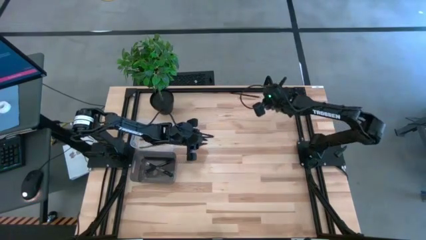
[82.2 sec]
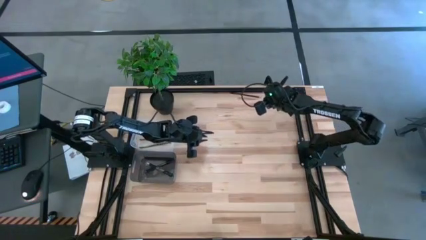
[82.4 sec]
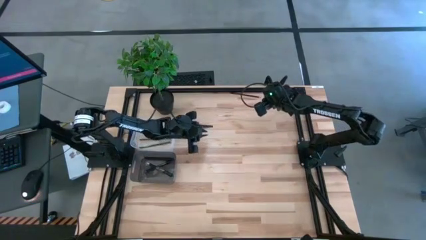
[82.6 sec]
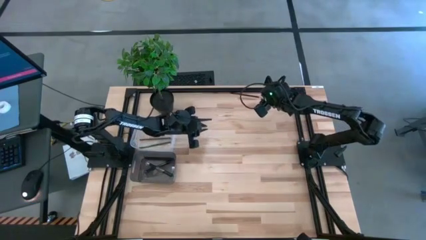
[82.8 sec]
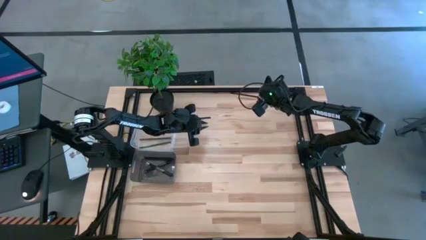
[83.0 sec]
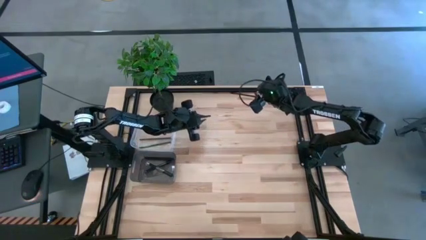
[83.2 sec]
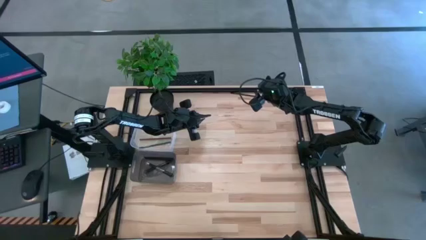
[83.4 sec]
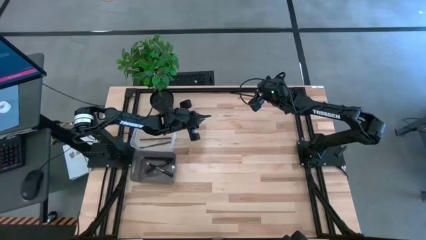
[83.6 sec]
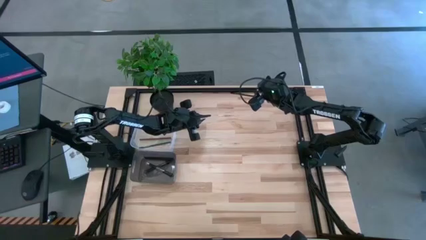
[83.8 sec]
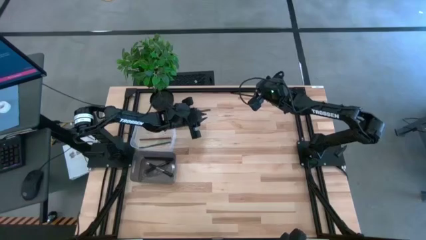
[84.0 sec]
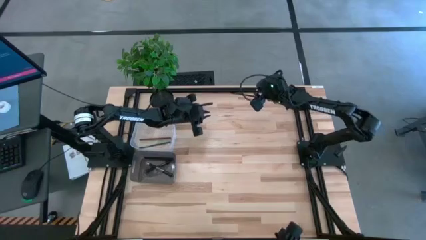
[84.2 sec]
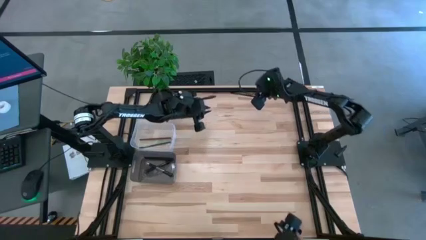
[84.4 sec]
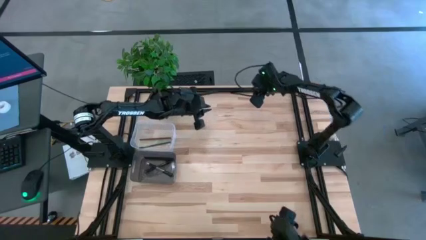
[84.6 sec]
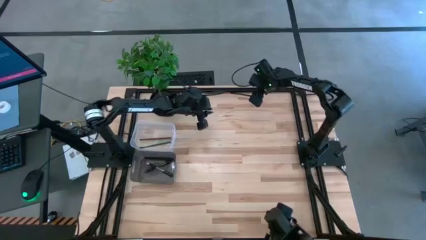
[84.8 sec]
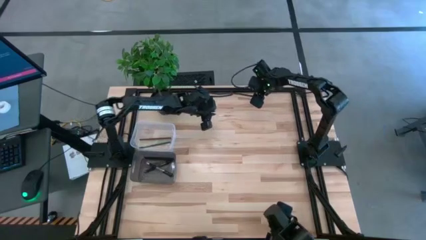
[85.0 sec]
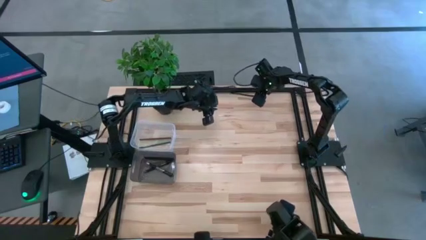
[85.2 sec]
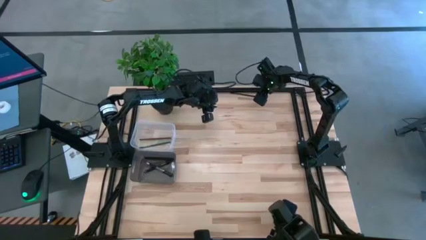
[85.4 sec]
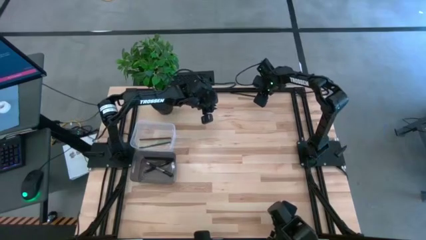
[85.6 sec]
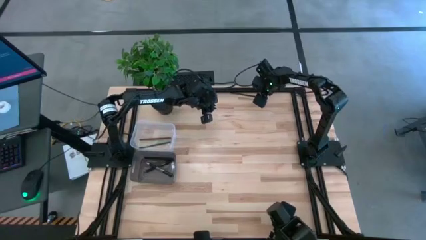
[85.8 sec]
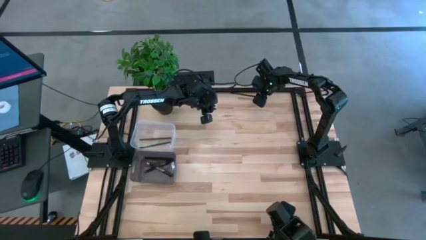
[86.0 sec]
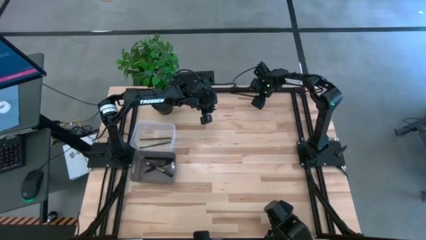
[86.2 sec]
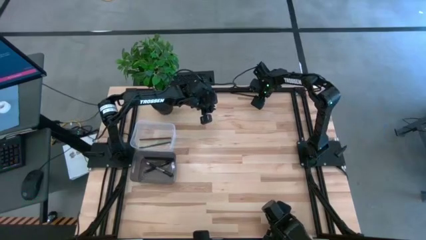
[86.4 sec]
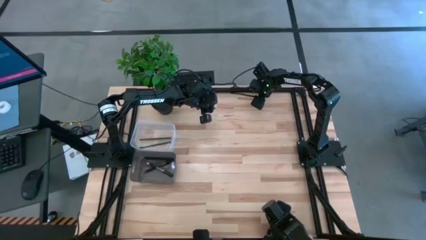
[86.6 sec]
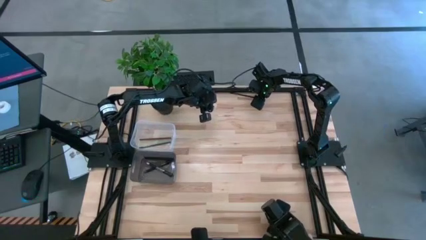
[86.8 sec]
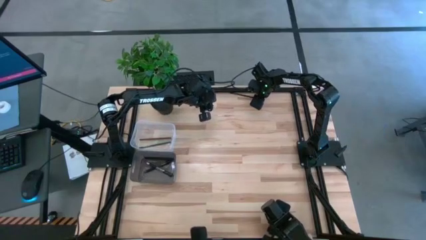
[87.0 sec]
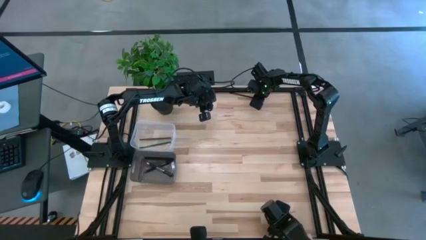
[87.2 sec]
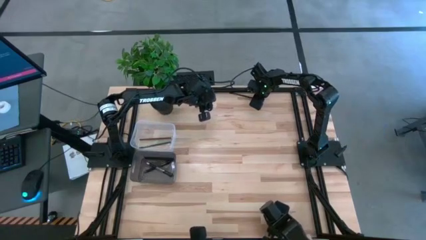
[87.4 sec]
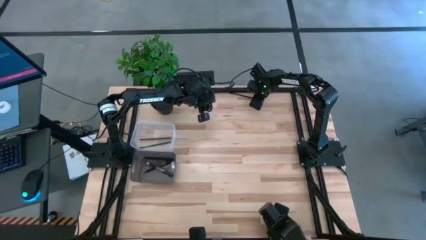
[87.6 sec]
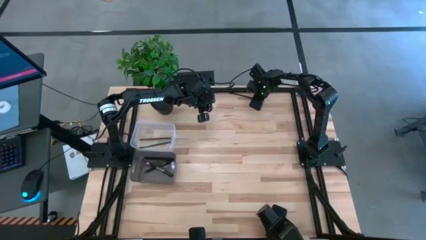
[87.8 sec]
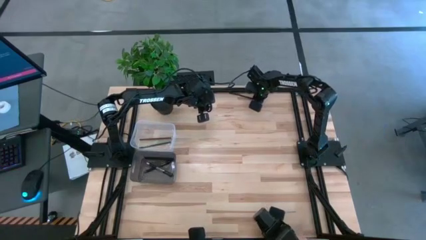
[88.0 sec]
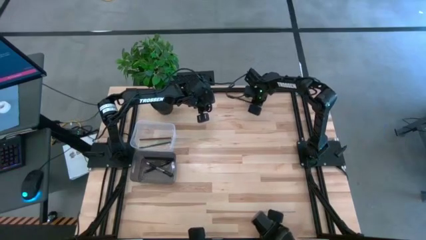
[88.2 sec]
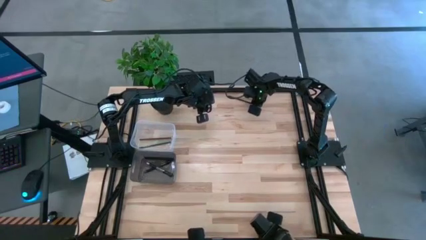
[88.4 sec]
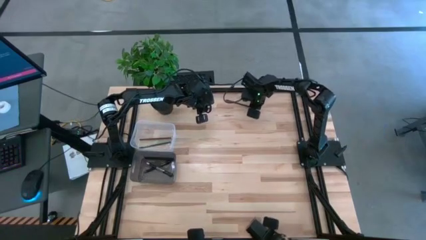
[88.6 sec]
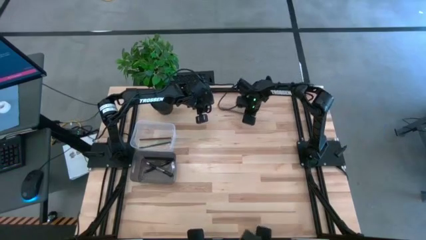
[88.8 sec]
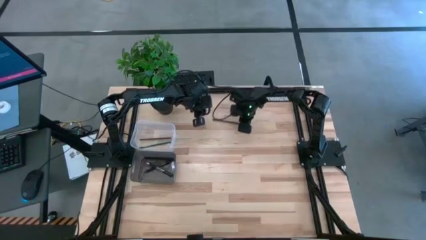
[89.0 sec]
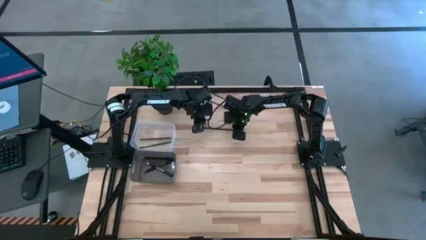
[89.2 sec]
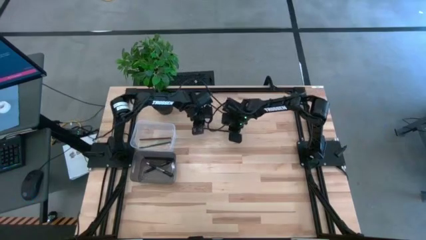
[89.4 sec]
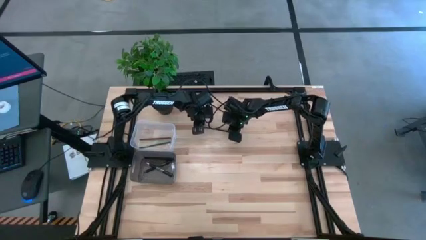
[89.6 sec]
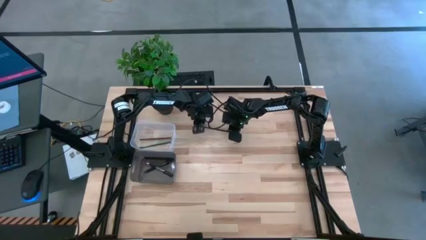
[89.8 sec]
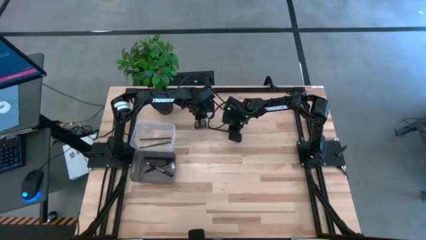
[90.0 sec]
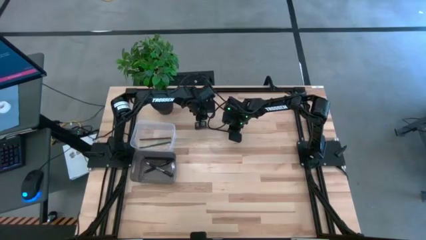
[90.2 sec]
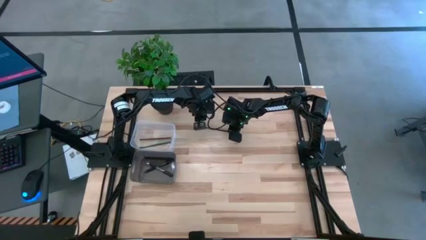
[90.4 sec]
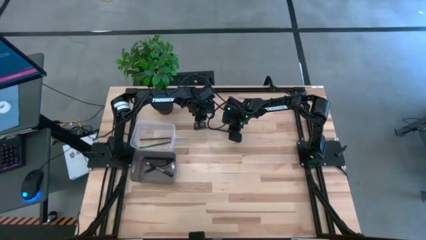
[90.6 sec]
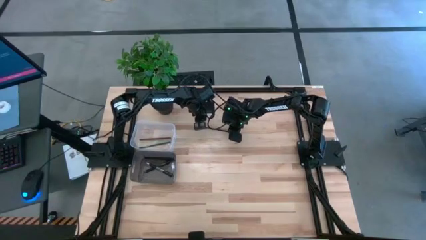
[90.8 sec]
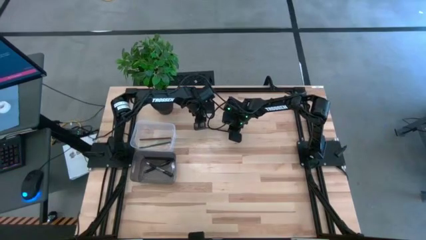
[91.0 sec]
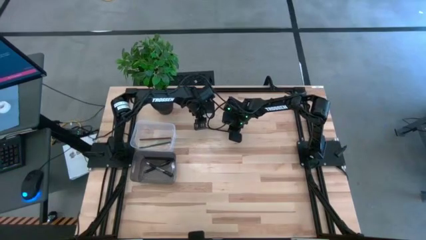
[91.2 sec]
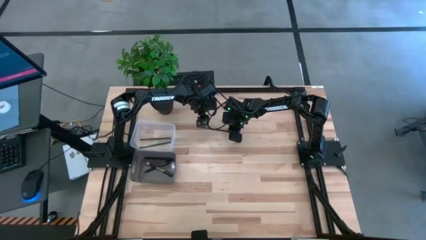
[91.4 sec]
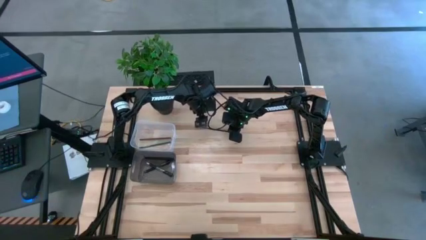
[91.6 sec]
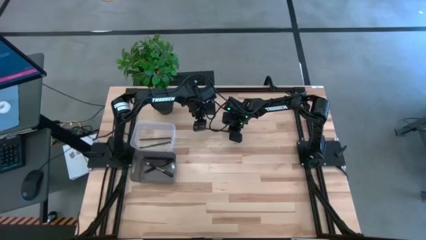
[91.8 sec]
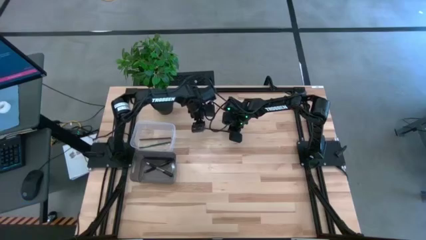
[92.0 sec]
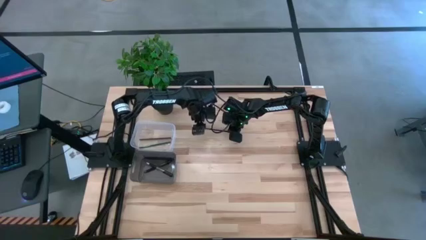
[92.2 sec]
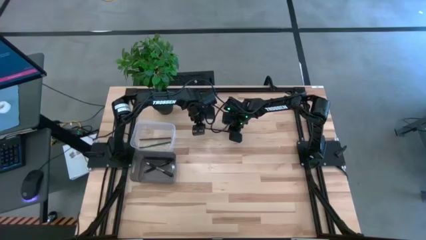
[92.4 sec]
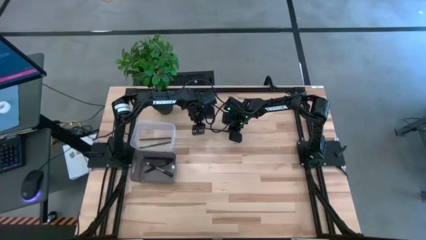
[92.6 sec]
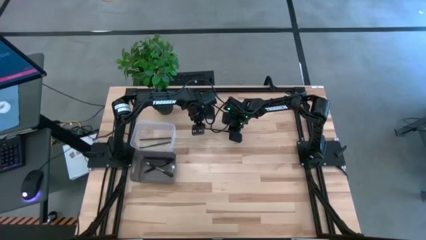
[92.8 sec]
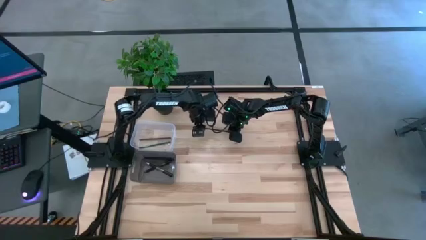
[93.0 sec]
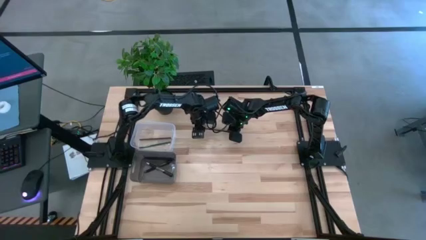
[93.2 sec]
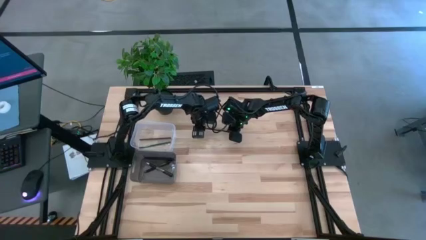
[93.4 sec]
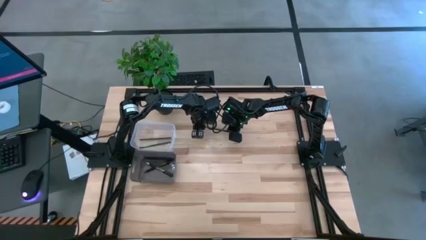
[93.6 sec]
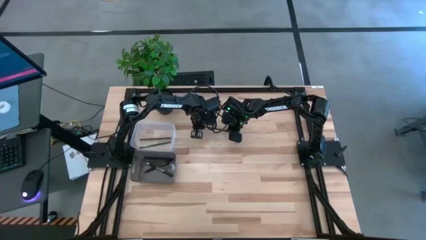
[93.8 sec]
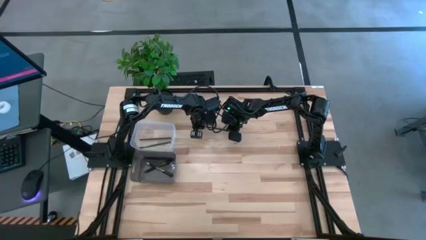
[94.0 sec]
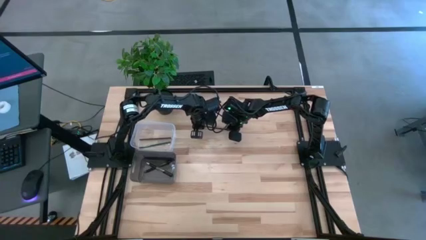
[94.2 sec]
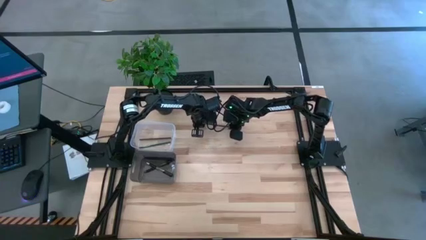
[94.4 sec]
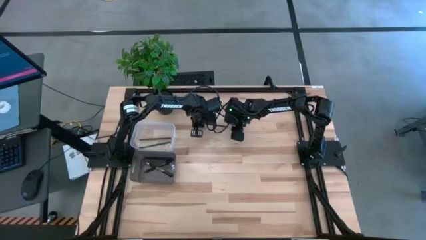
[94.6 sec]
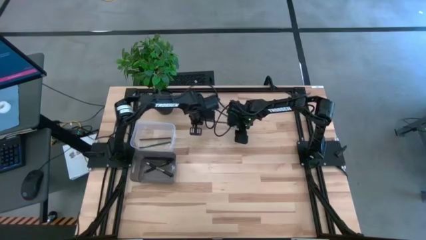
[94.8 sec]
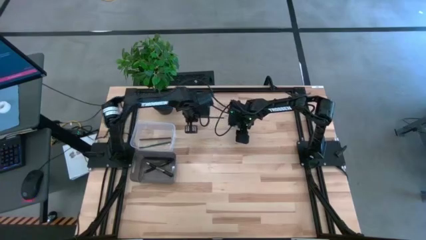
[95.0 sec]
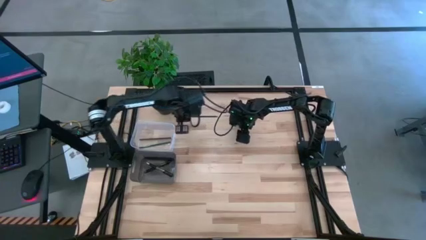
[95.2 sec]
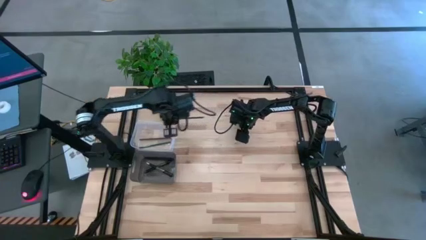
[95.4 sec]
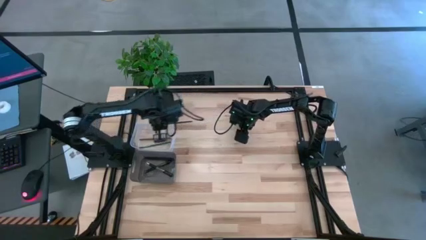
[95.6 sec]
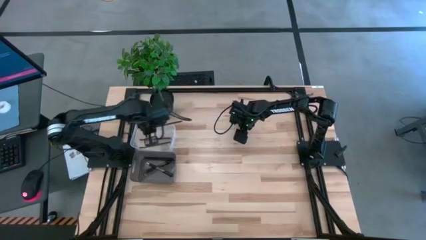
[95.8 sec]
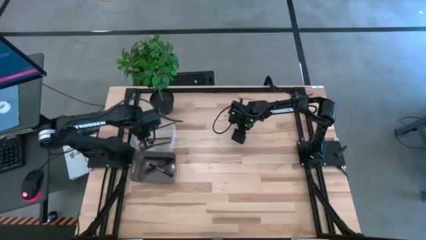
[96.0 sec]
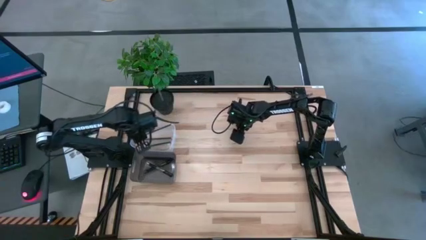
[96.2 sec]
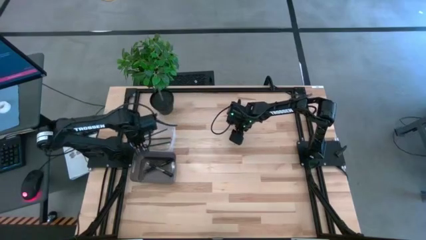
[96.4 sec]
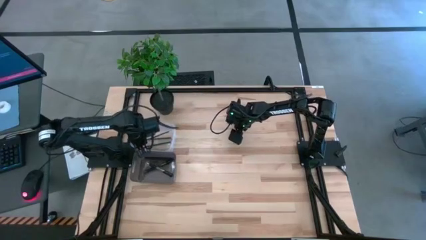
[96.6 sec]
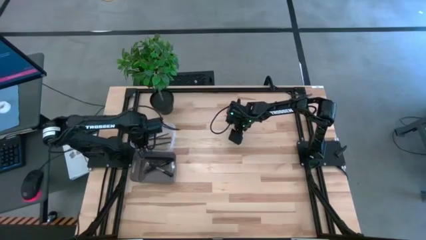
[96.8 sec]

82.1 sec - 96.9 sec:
Task: Sort pens & pencils
Put the black pencil into the transparent bin
